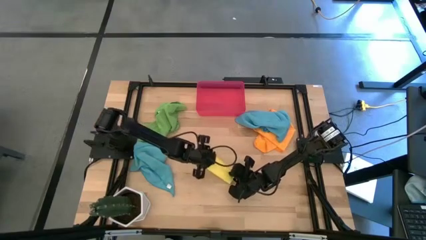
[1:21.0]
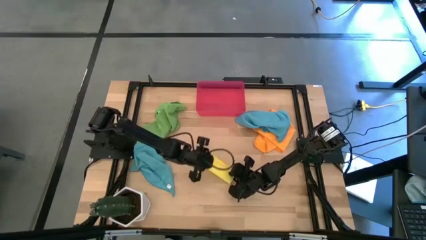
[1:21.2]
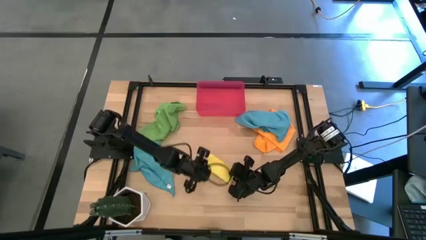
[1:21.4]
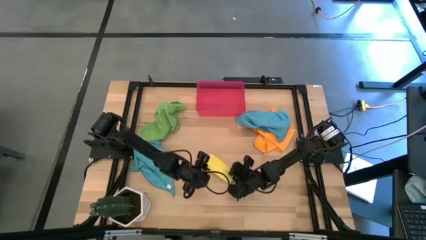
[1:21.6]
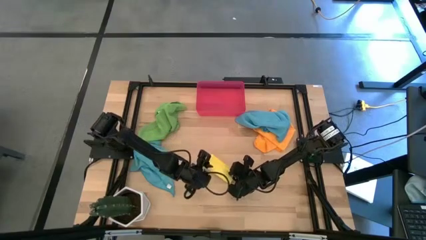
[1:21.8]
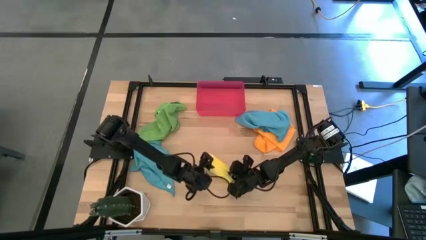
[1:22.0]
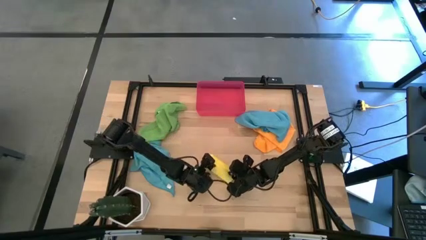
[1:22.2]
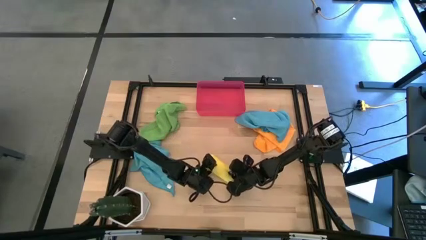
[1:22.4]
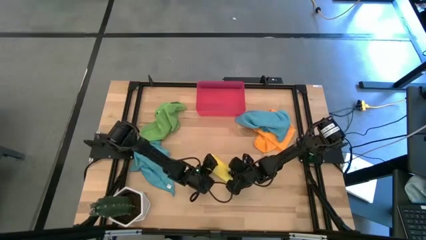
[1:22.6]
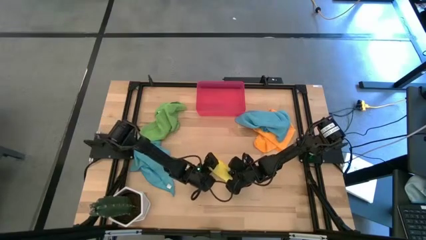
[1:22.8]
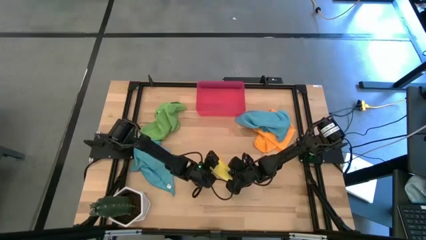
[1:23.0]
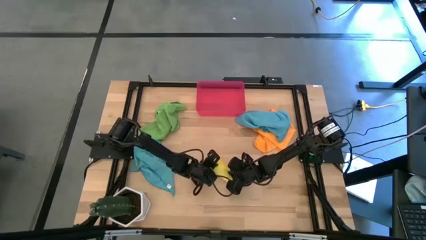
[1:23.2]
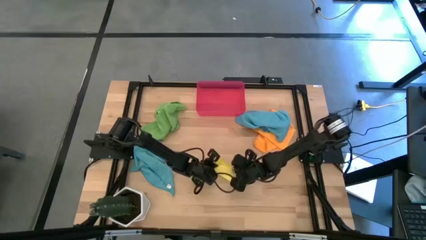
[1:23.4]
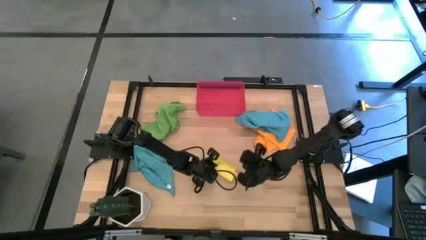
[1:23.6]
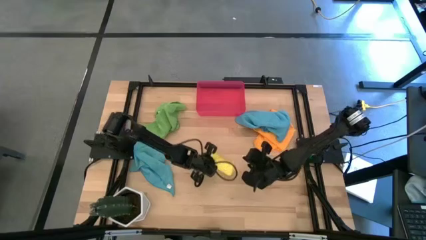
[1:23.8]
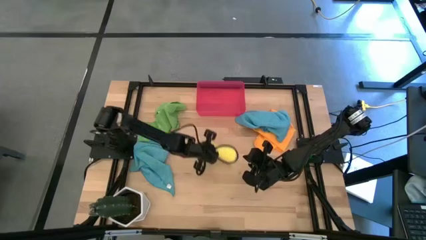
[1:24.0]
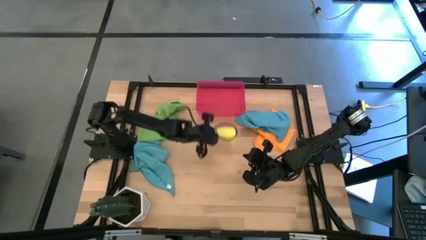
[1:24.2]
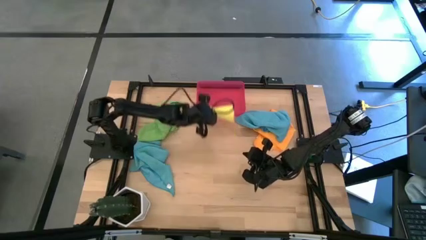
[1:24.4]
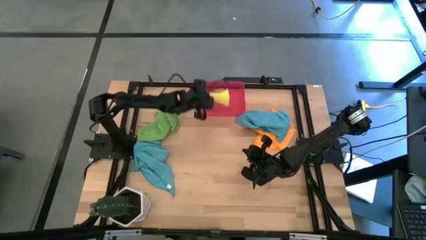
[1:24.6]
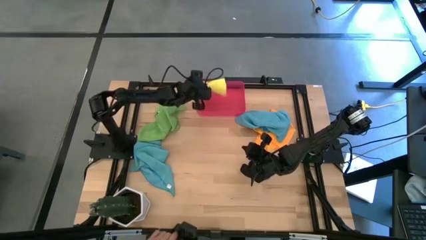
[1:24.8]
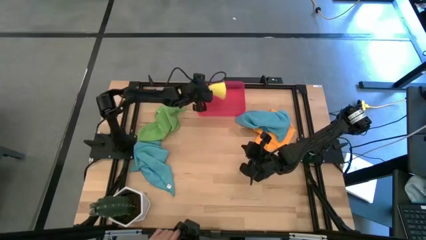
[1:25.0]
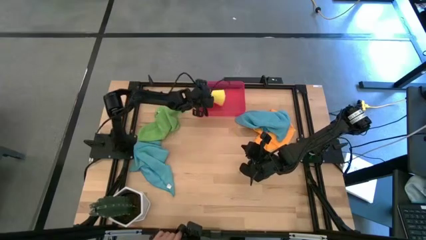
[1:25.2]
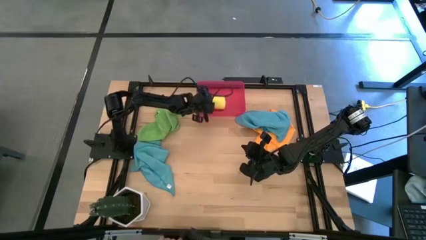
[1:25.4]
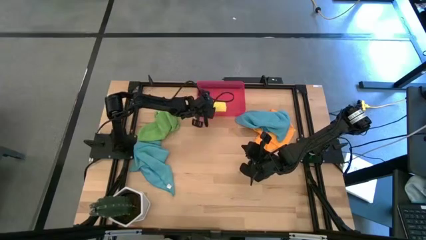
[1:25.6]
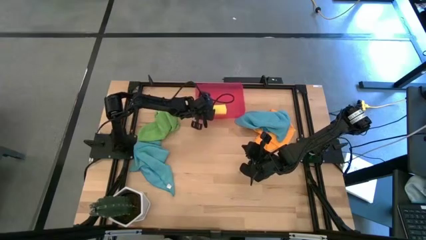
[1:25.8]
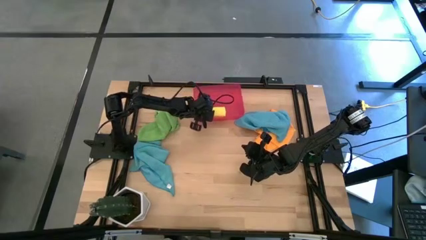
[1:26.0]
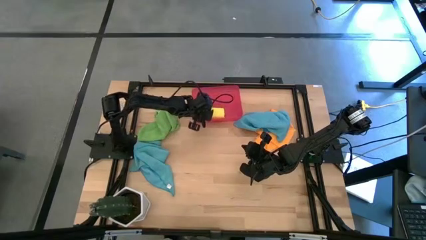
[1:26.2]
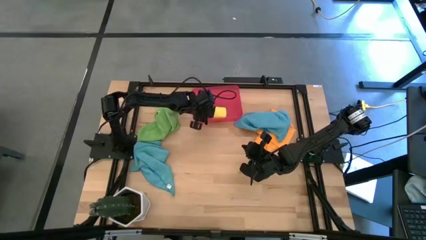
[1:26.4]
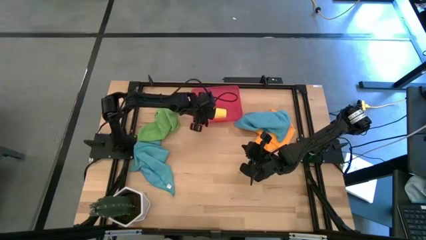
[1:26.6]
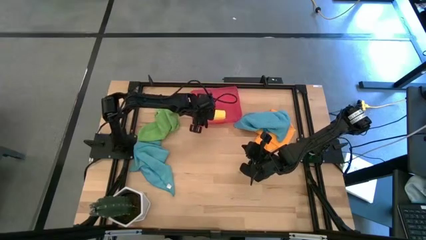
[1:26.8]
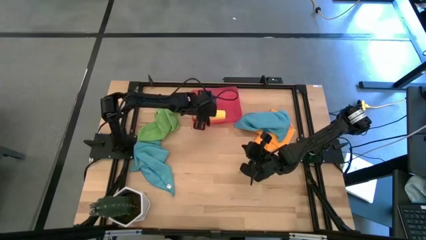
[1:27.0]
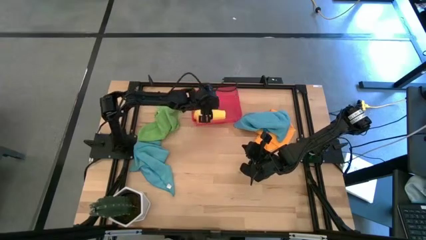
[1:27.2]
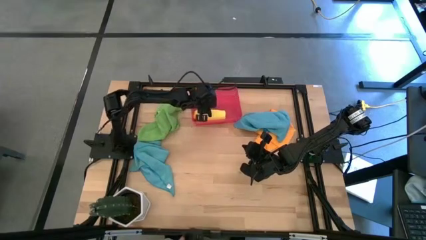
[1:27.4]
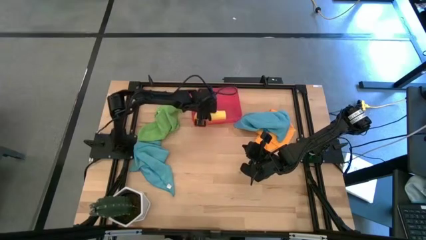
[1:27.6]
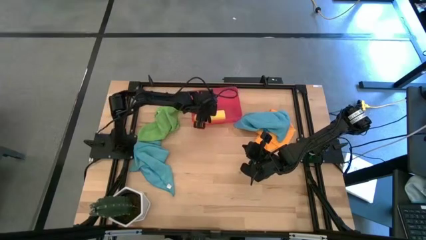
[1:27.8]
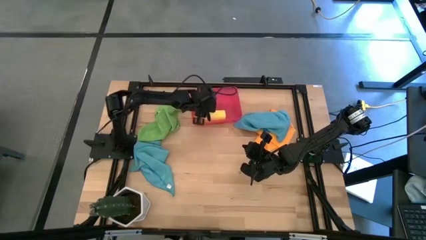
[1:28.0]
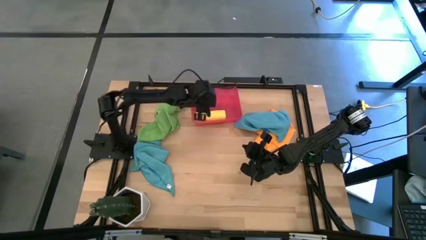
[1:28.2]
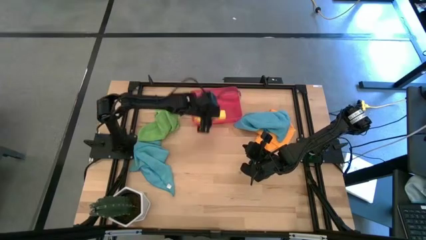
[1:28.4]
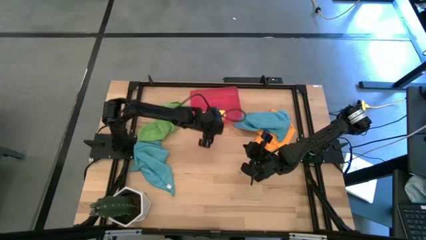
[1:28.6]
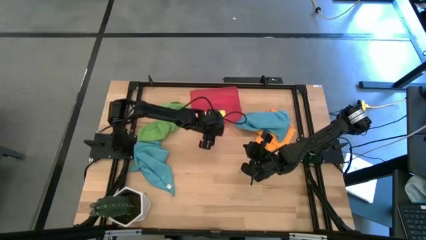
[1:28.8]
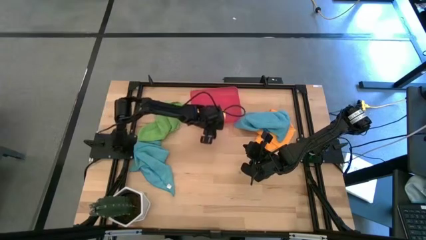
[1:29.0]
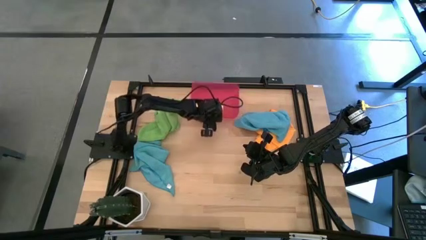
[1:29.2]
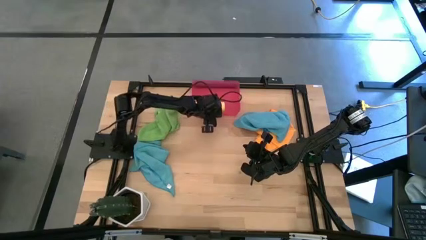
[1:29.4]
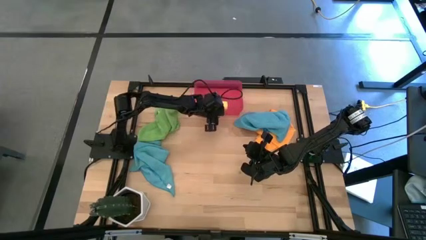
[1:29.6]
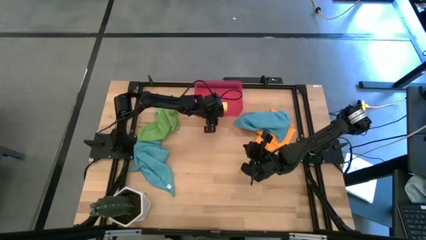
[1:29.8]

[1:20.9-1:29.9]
Task: Roll microfiber towels into tight, uniform cylinder then place into a basket
Put the yellow microfiber cloth into the red bin

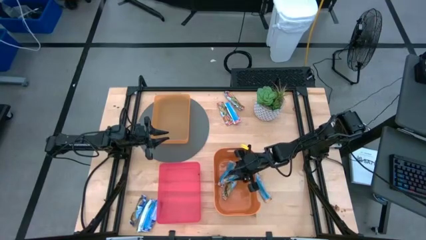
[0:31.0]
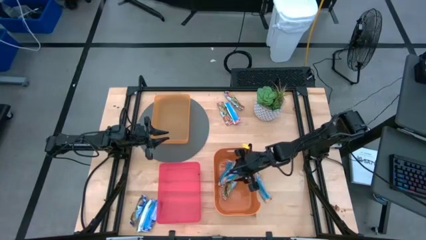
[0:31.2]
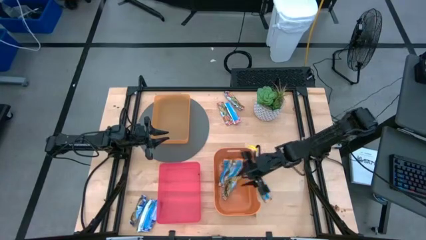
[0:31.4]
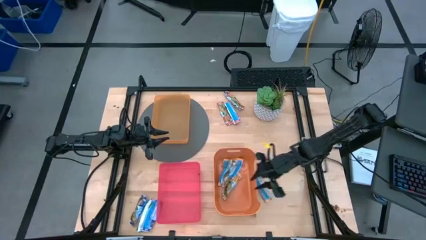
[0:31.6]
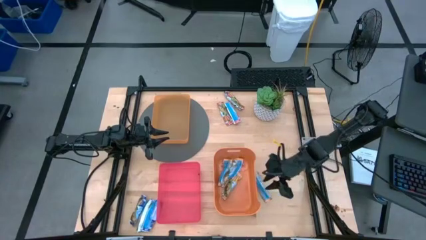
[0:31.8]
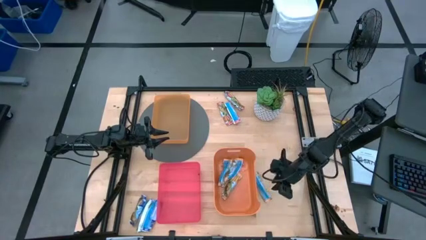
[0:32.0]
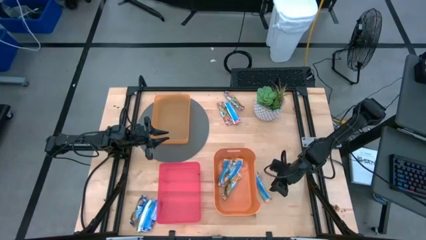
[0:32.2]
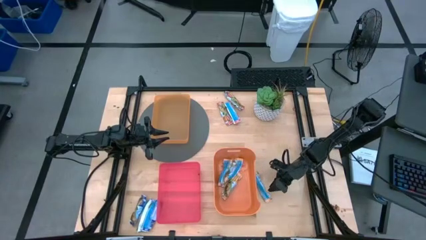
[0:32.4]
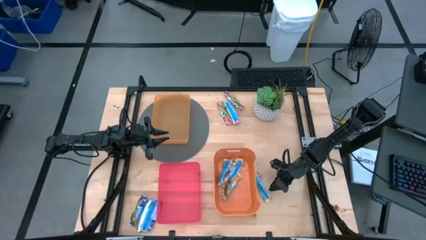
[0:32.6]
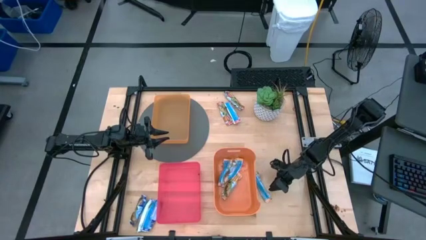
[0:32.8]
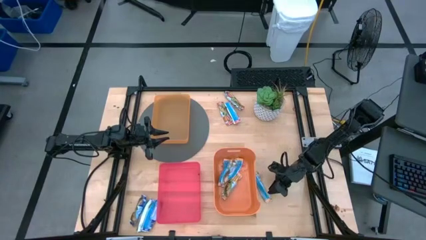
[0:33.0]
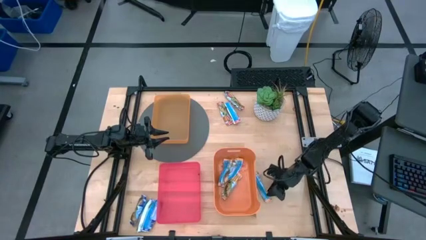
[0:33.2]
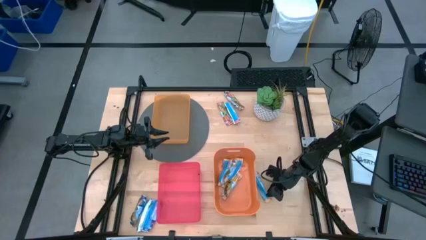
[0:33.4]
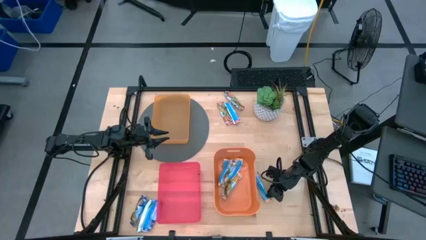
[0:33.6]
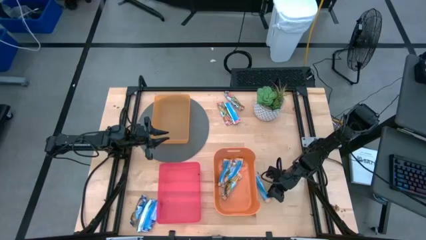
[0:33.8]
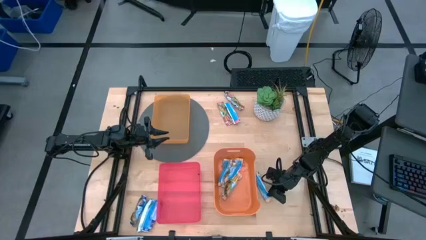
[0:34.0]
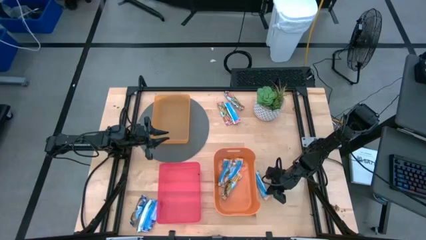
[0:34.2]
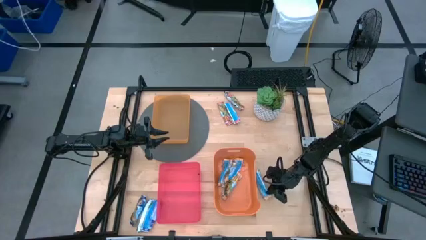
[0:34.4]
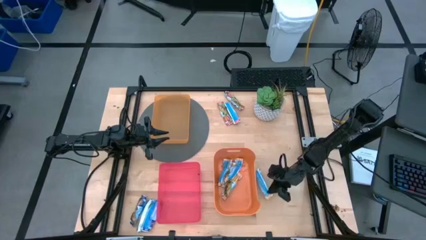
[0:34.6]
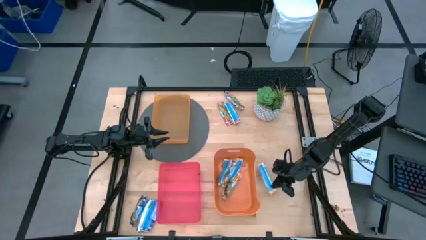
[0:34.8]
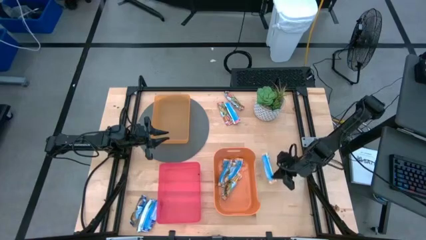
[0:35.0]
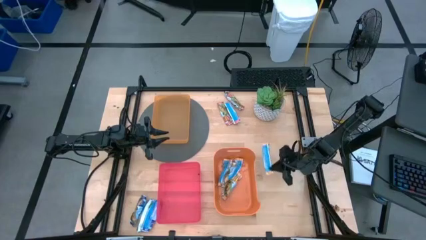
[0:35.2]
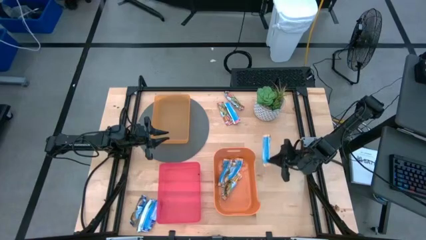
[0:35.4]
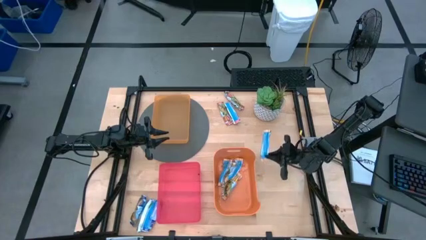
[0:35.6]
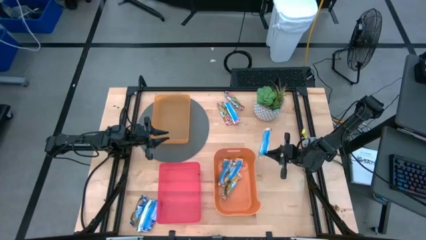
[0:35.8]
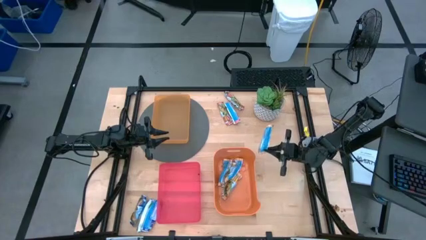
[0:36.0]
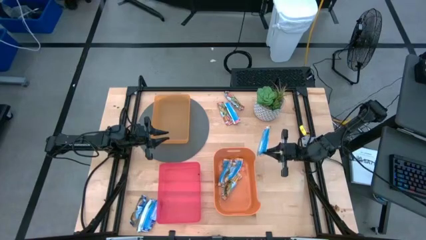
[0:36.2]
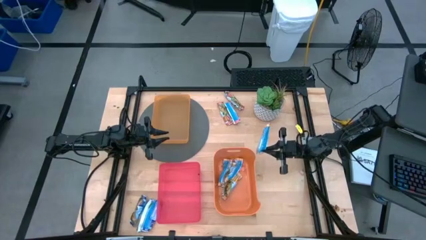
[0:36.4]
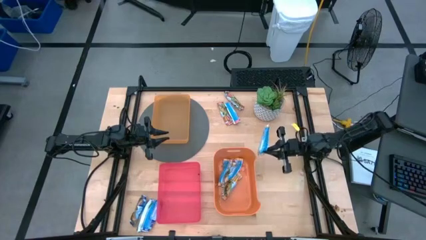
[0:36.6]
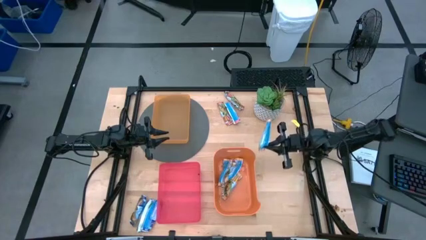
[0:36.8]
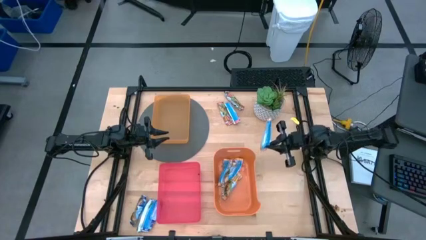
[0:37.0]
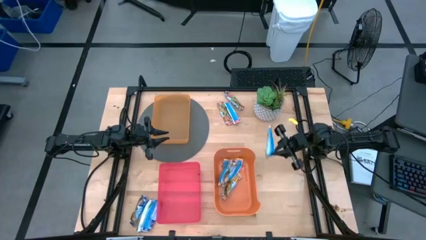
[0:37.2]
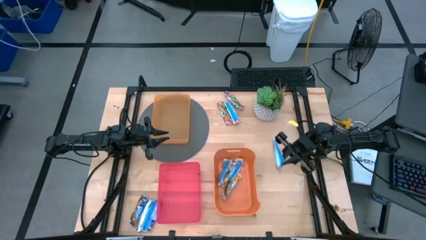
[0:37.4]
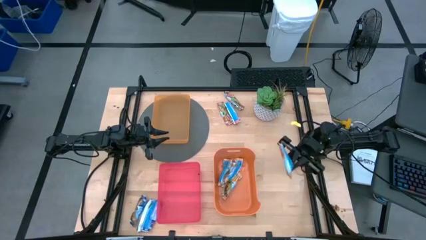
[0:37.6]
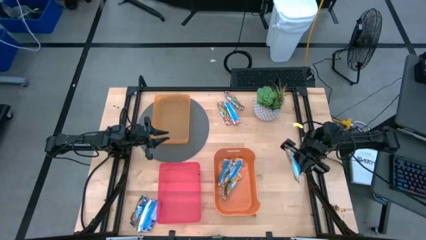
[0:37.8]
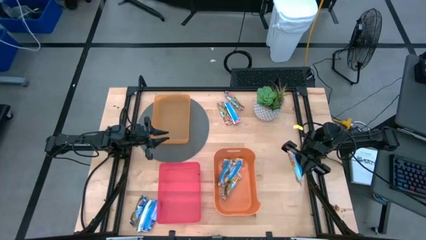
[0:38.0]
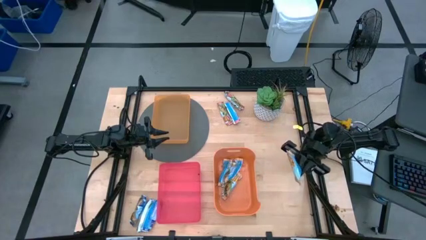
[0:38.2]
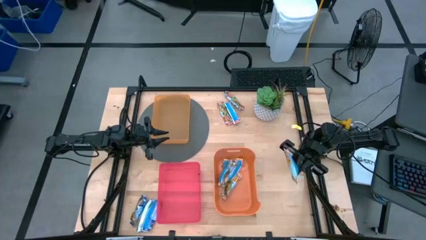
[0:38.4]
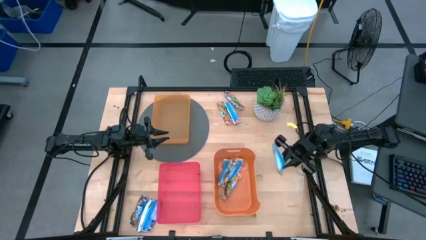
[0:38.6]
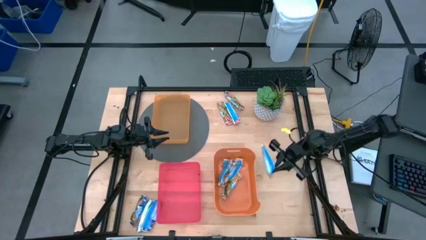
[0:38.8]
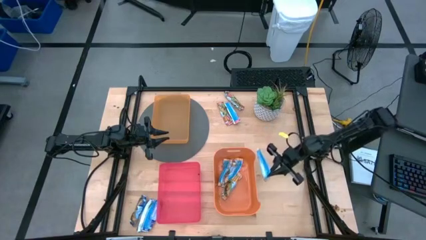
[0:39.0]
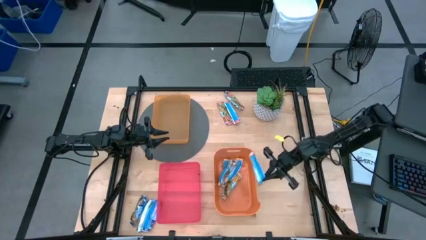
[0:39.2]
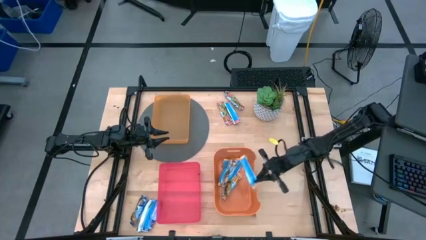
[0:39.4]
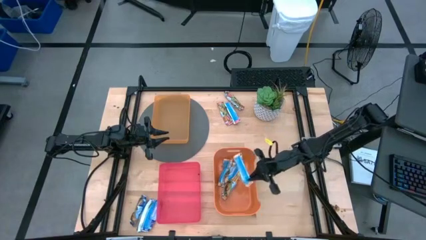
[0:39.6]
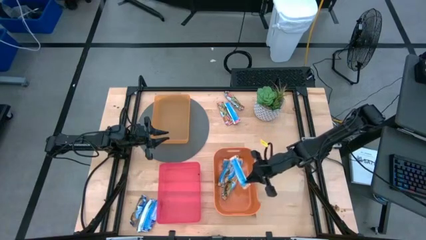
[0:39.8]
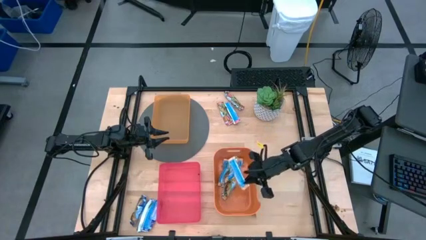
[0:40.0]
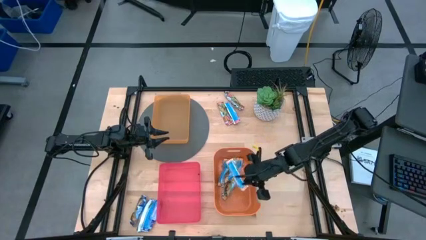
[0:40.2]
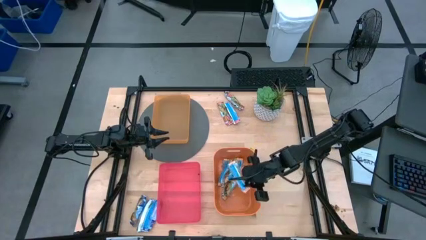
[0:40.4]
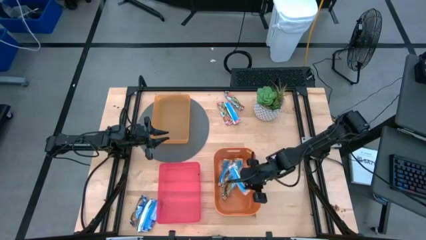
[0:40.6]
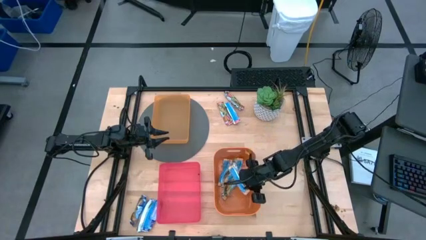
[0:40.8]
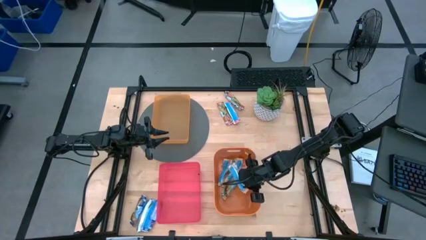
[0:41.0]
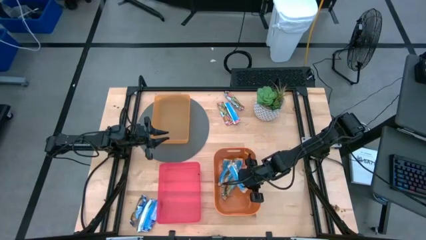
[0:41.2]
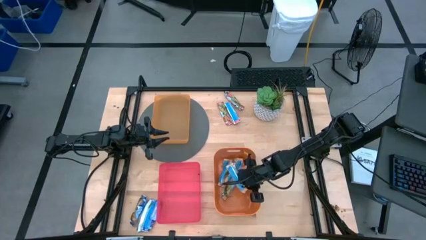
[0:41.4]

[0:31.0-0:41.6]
Task: Pick and place Granola Bars by type
Put the yellow granola bar into the orange bin
